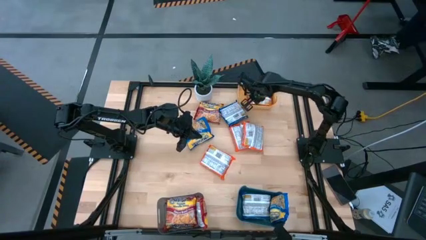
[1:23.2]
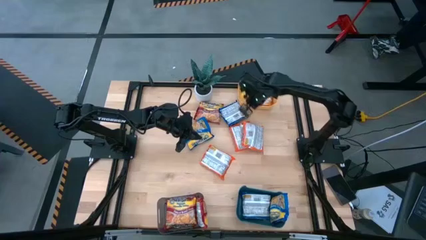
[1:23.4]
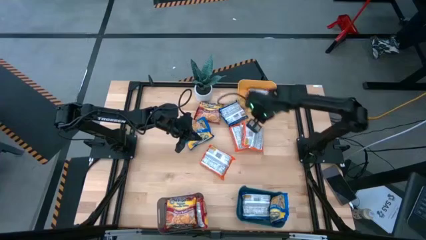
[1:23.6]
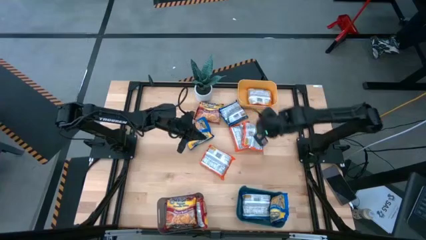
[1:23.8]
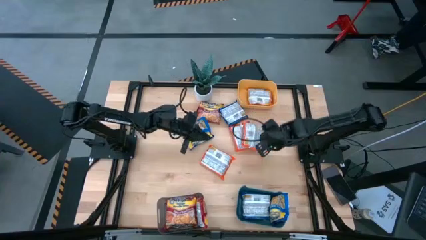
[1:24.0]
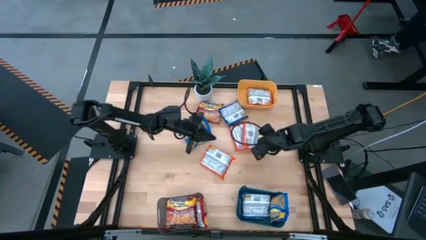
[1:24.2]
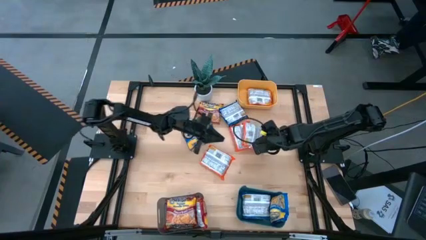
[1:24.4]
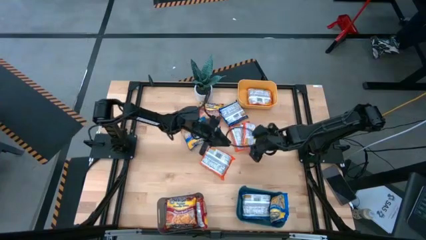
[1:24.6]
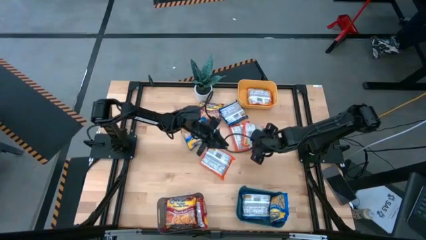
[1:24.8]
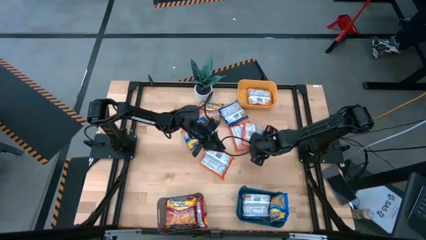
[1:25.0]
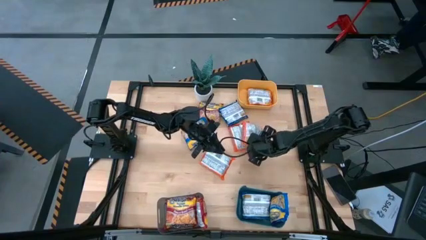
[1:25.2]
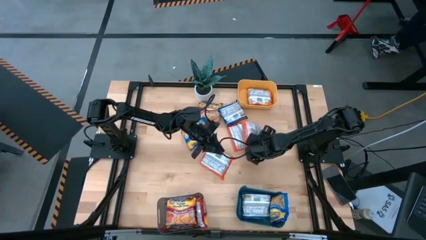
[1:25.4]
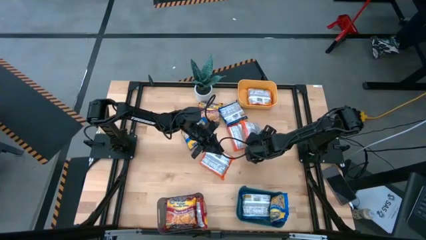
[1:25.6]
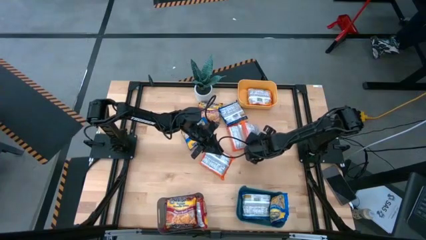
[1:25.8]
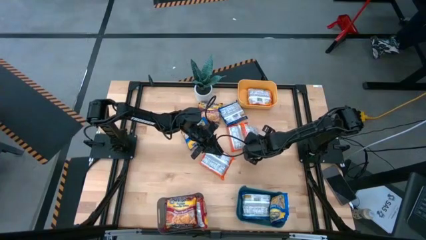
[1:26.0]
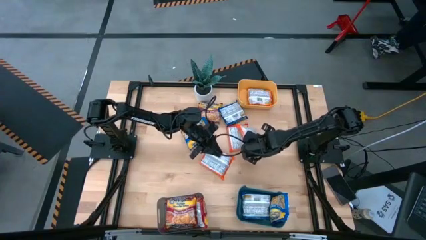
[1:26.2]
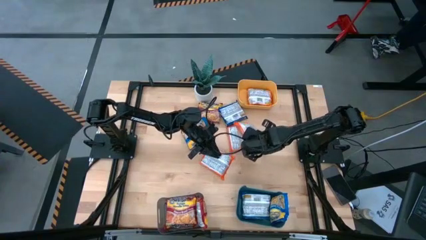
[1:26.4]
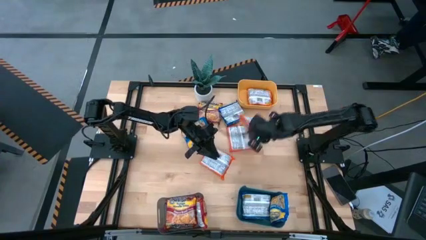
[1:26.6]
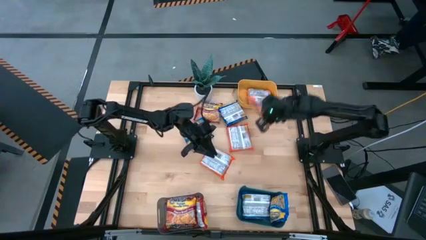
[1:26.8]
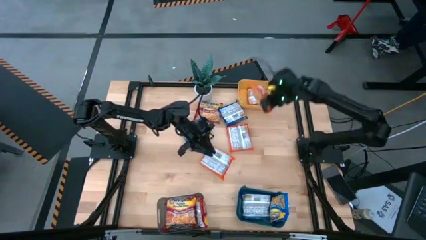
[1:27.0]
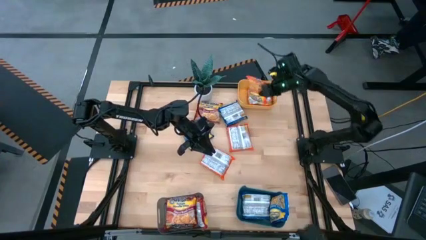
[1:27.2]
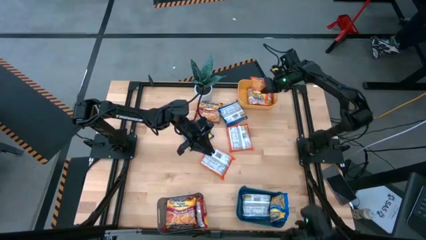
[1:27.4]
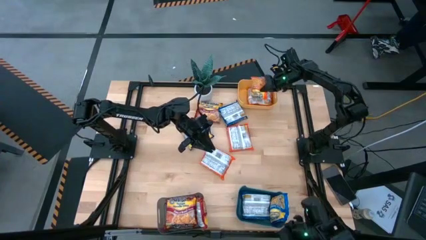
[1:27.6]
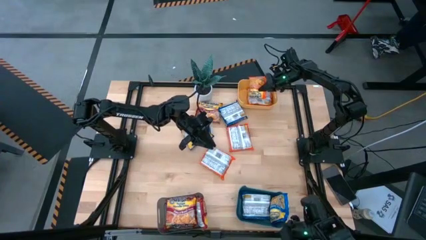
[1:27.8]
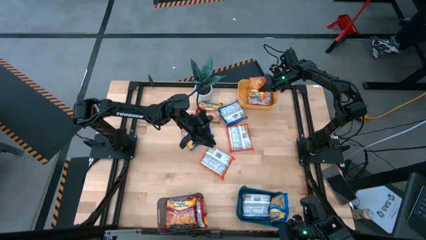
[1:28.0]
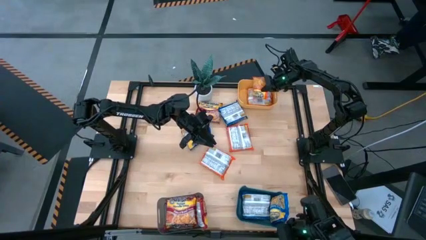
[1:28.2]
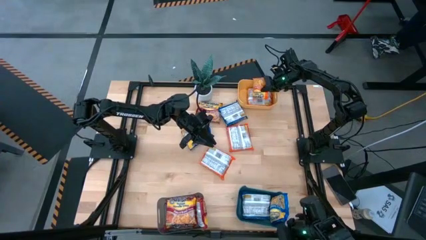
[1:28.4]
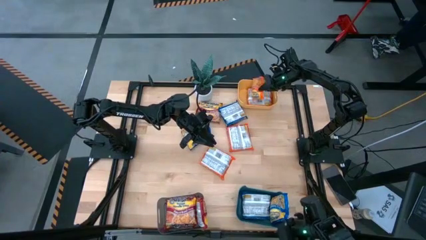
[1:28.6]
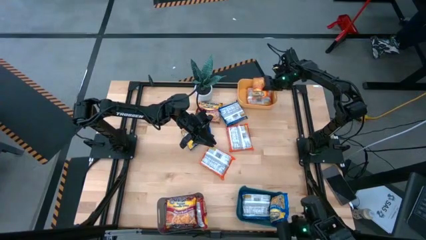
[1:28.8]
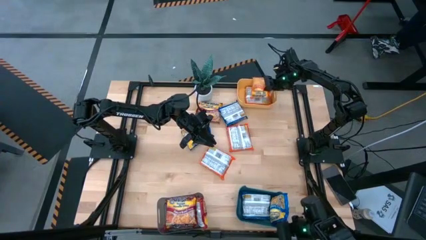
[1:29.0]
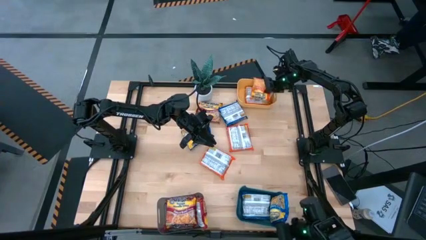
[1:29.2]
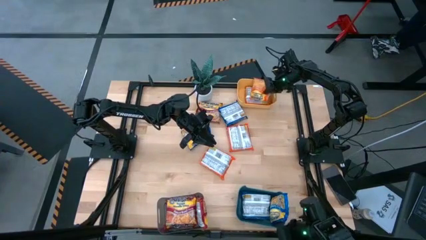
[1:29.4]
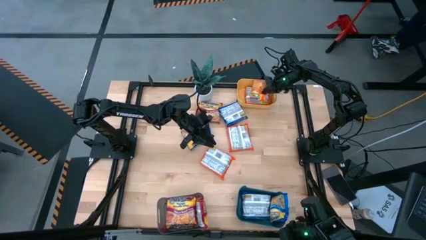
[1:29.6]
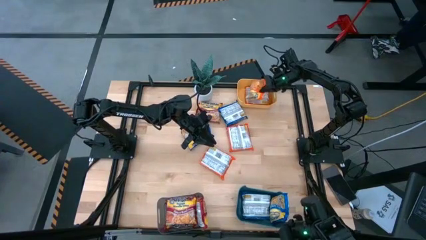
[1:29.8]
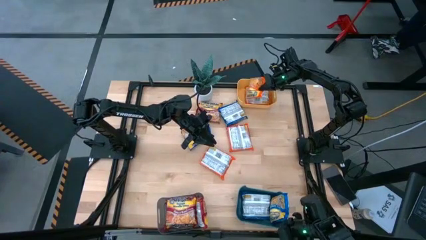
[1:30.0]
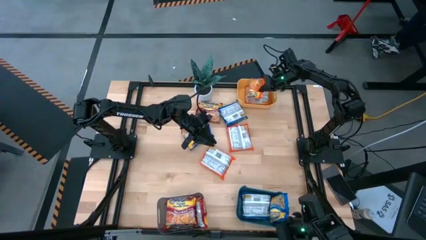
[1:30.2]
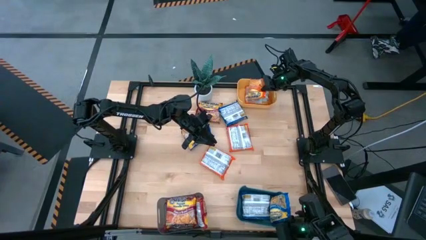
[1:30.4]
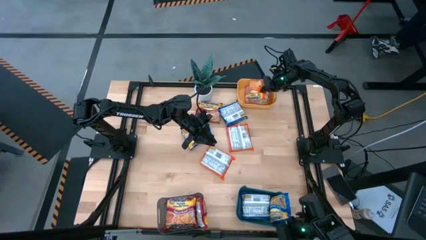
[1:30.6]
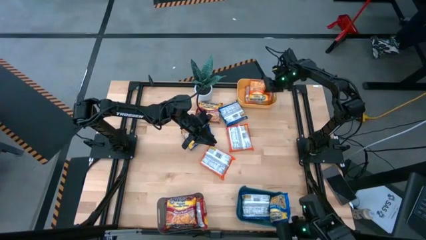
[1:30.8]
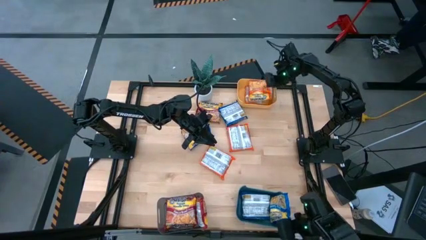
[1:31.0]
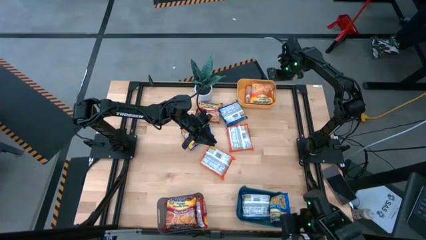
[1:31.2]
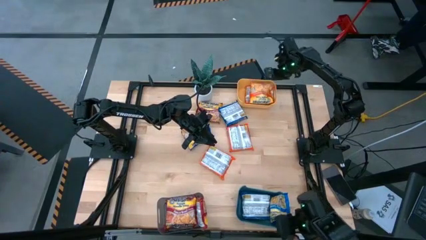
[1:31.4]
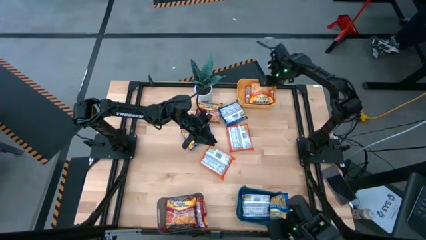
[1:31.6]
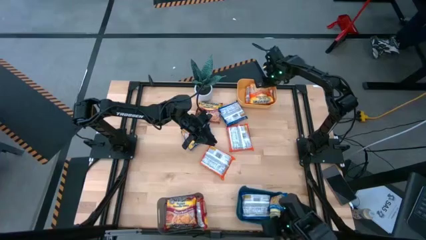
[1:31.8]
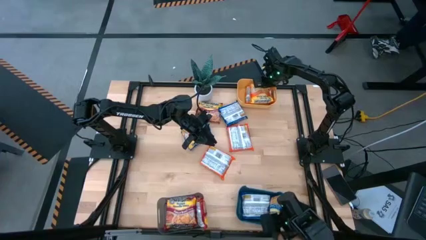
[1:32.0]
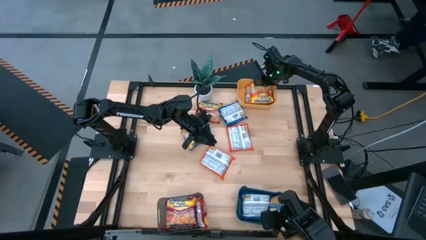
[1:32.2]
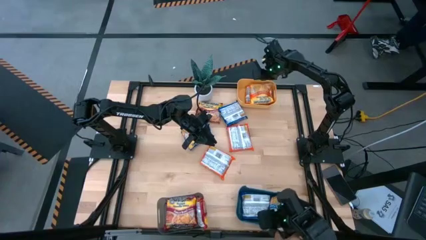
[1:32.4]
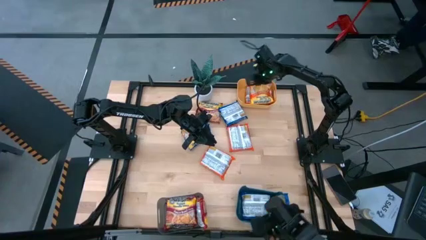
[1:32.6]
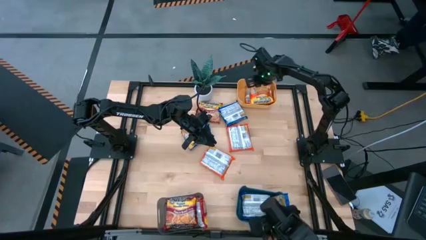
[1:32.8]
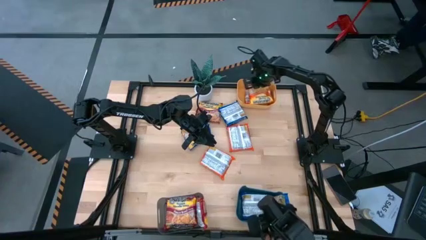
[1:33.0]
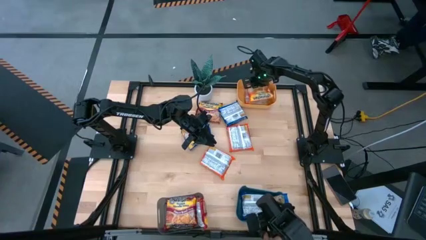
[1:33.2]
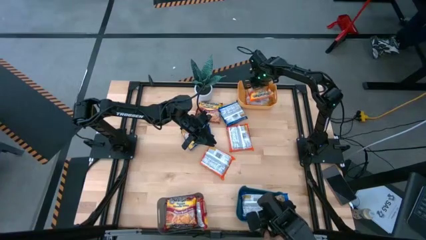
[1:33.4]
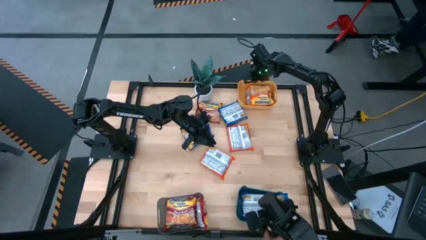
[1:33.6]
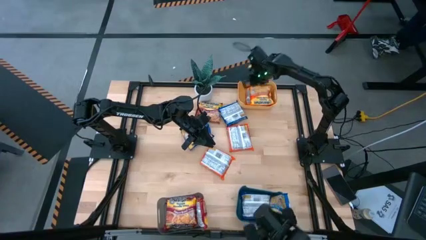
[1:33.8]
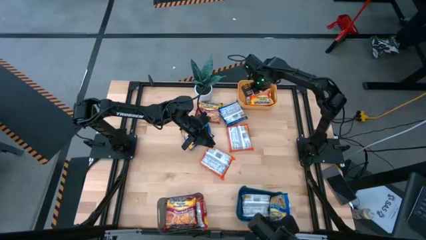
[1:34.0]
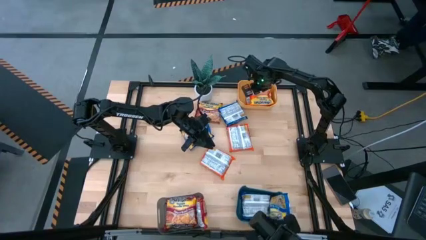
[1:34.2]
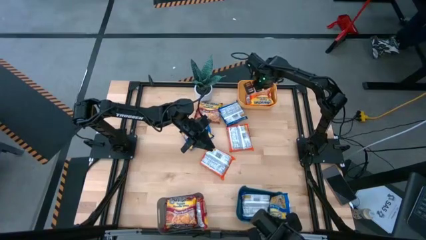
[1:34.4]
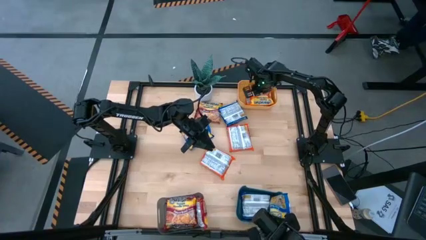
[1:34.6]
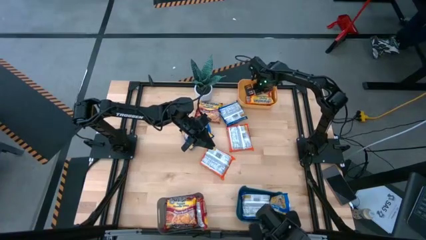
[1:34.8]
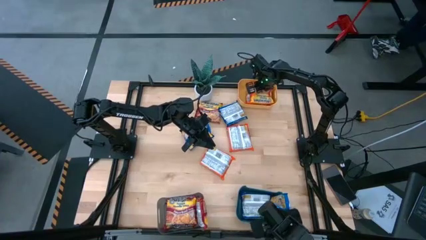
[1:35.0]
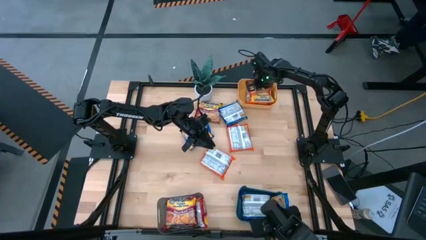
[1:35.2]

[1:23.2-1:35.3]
Task: Sort Maruchan noodles
Put the orange noodle pack into the yellow bin
